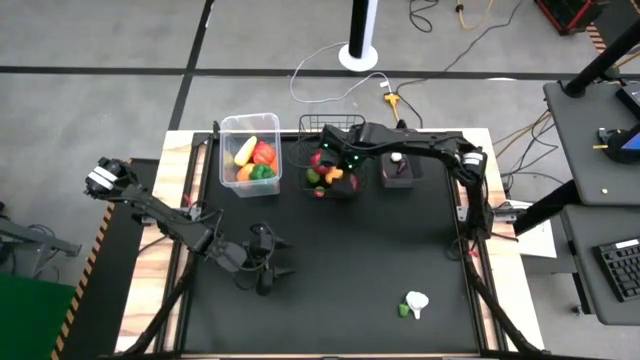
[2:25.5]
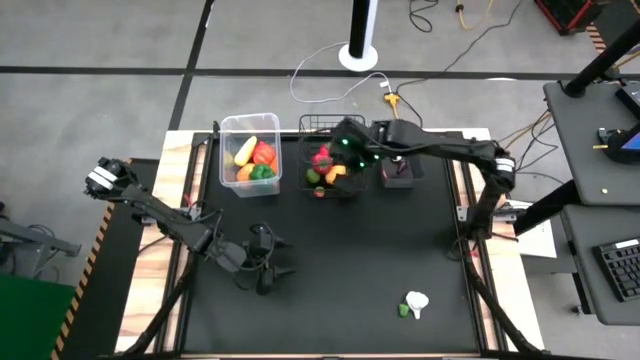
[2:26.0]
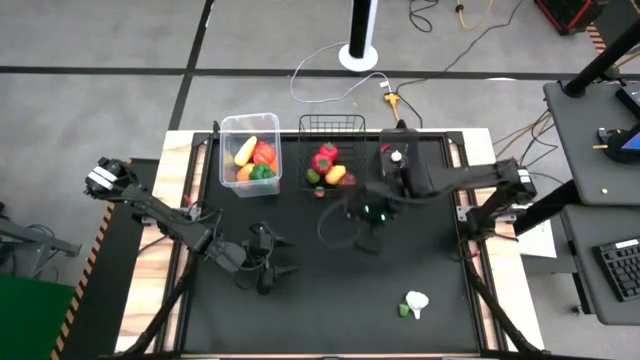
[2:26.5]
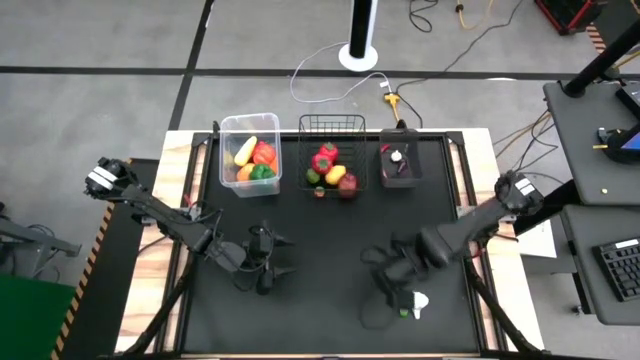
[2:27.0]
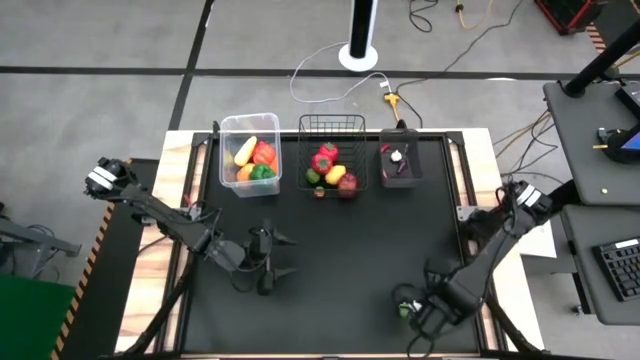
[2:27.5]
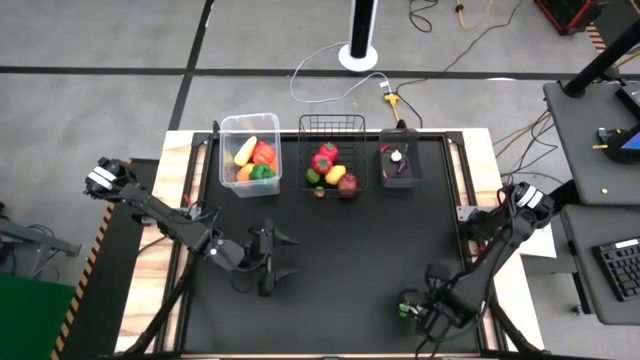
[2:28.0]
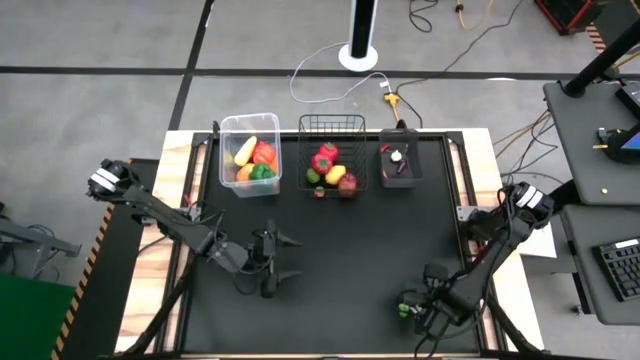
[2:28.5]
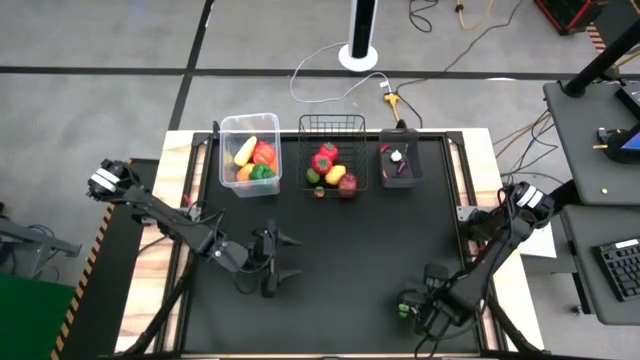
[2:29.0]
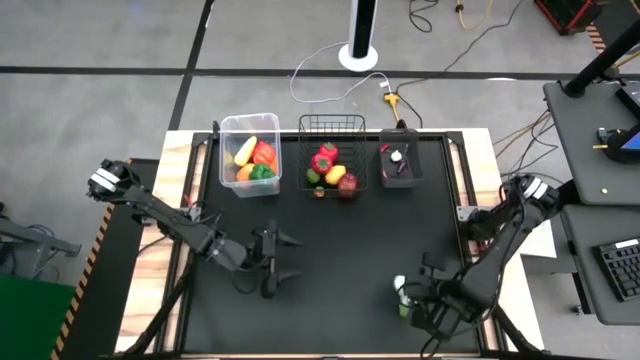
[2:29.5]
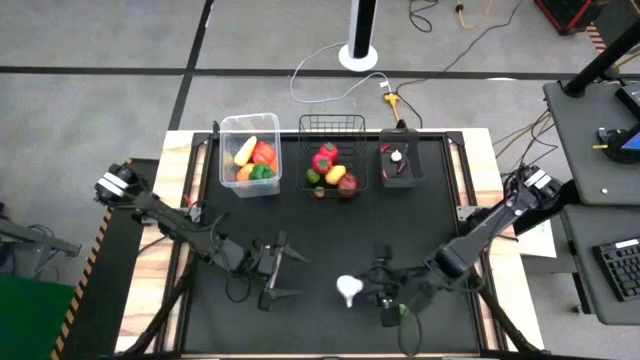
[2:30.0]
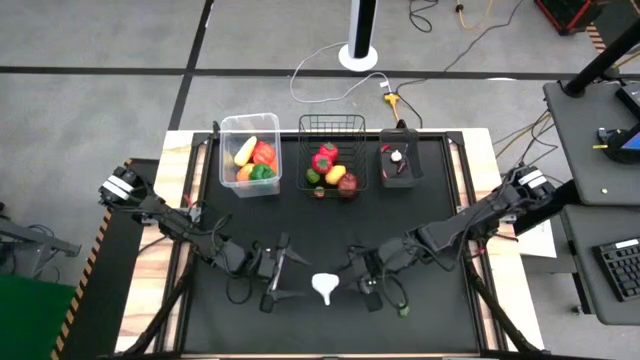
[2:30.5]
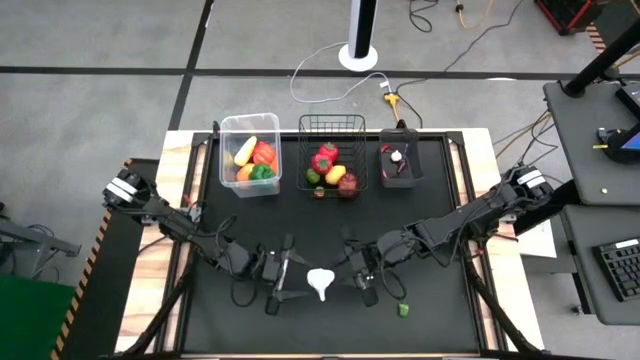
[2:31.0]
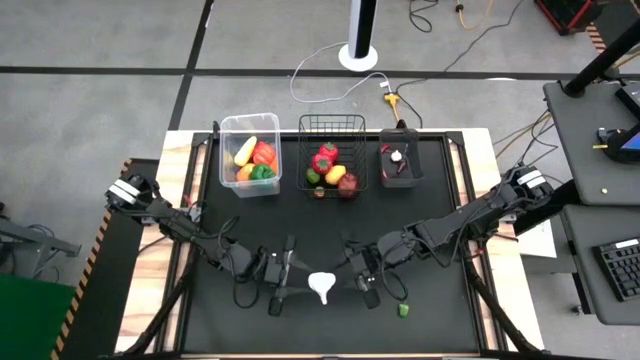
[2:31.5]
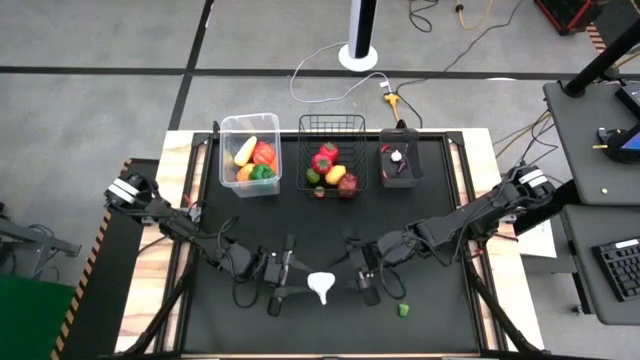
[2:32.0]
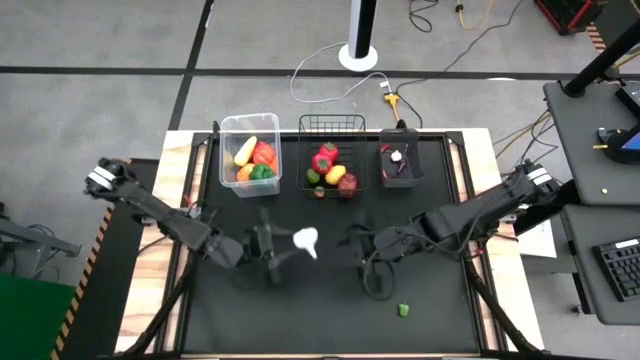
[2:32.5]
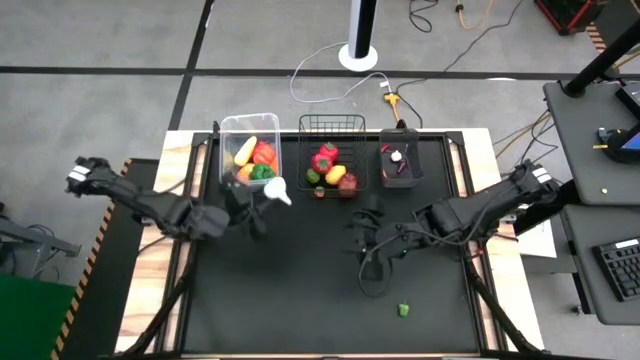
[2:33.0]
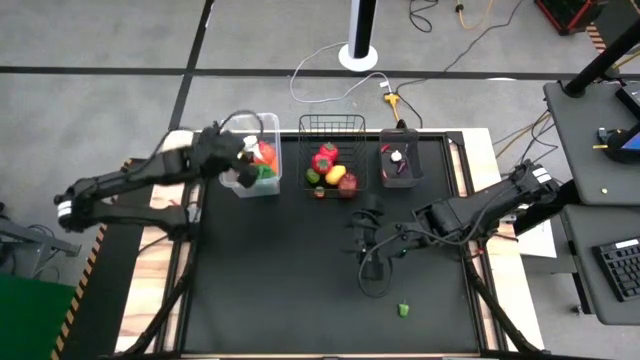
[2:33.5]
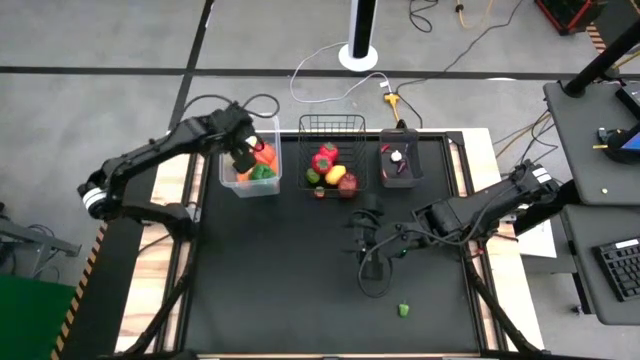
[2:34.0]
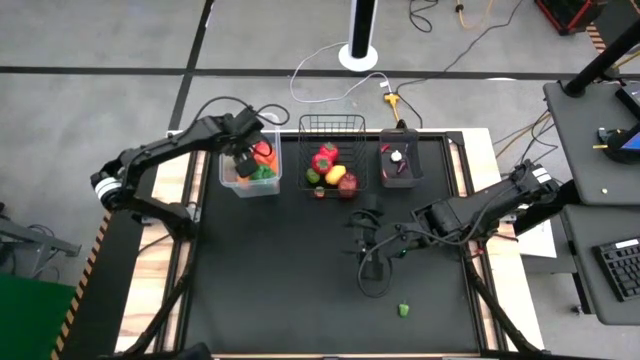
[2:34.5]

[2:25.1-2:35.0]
Task: Sort produce into baskets
Put the large white garlic into the transparent basket

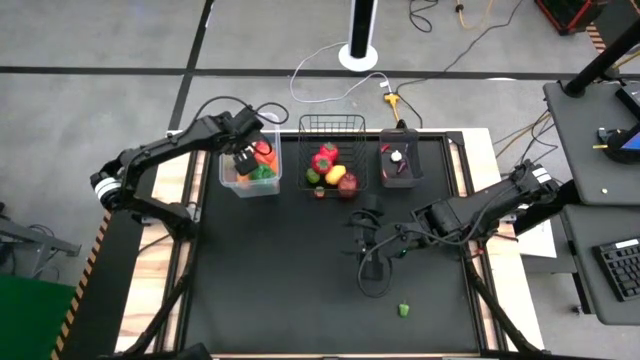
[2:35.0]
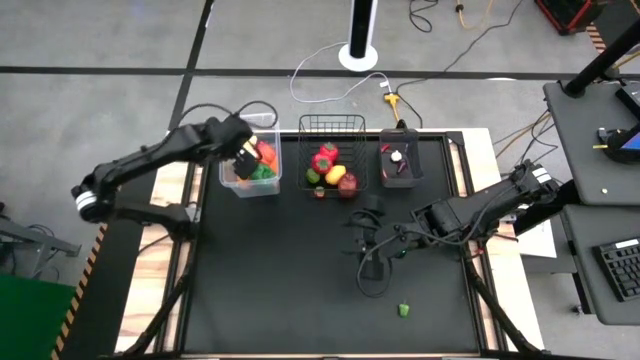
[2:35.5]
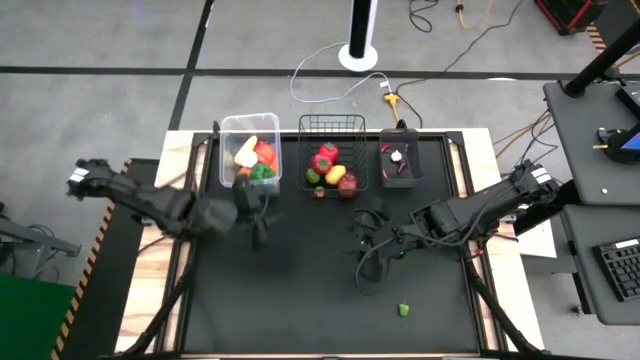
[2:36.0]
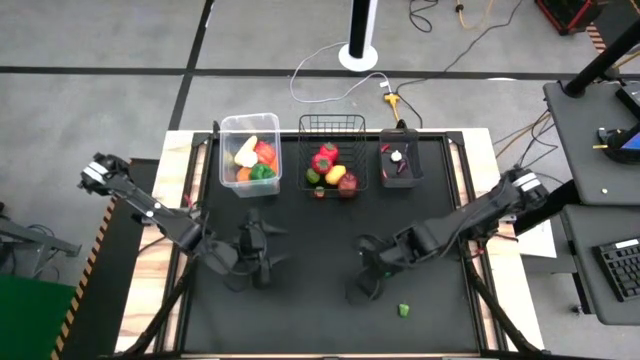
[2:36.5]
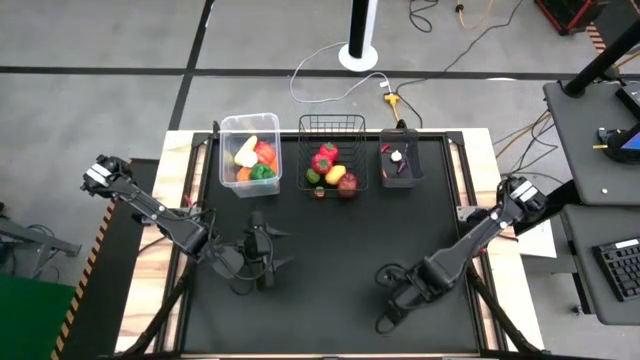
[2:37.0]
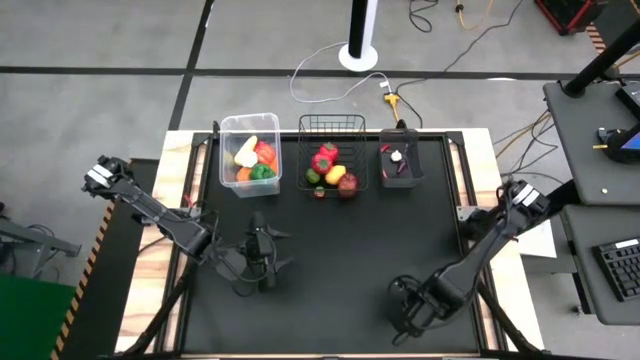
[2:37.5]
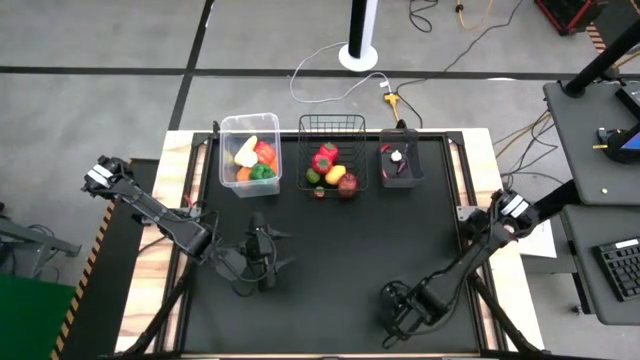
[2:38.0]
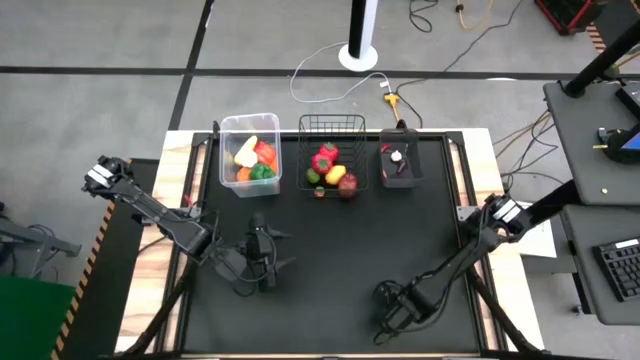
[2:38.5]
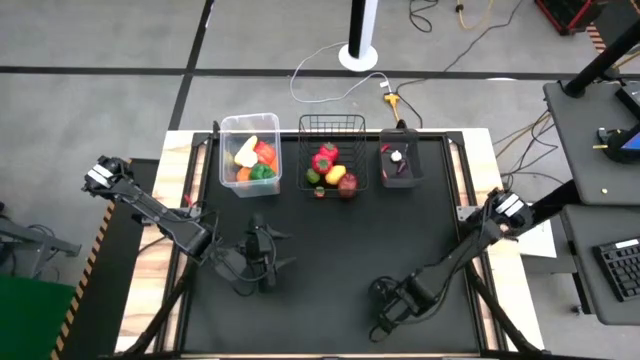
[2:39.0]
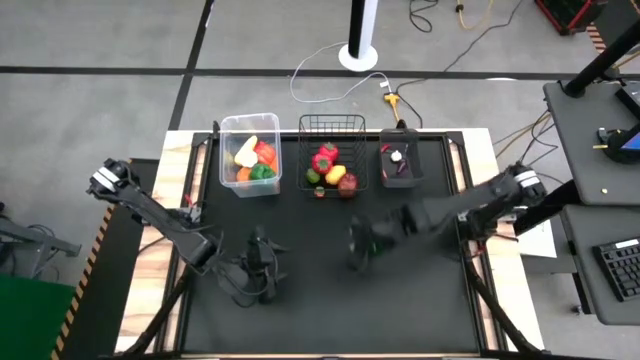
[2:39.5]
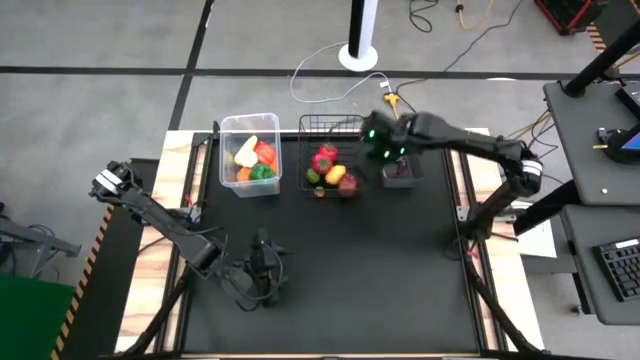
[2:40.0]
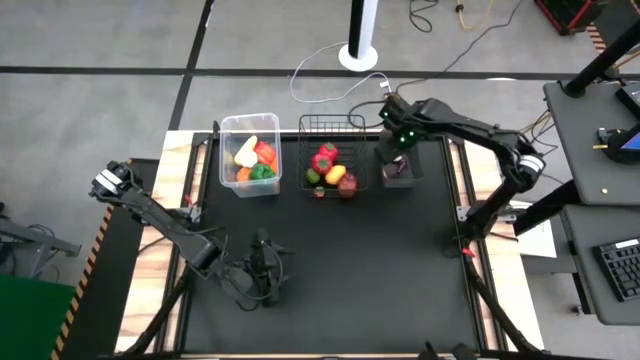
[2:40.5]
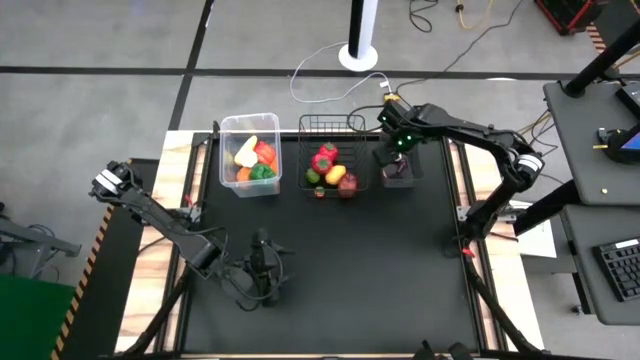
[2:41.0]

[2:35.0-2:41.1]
Put the small green bell pepper into the black basket

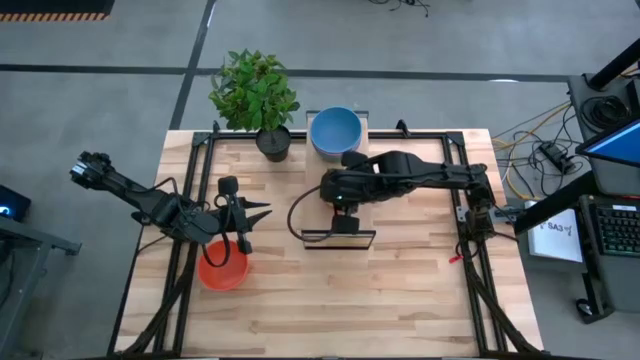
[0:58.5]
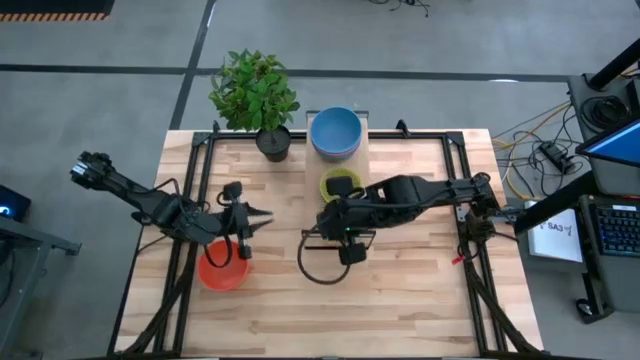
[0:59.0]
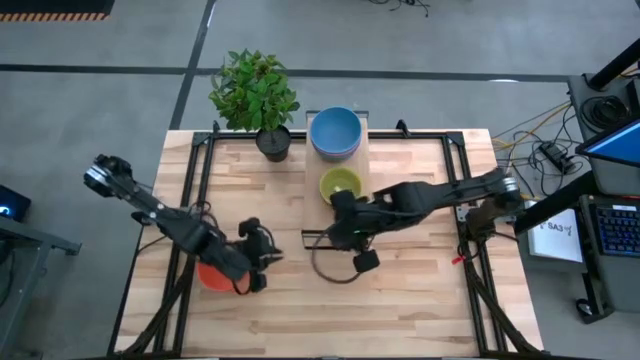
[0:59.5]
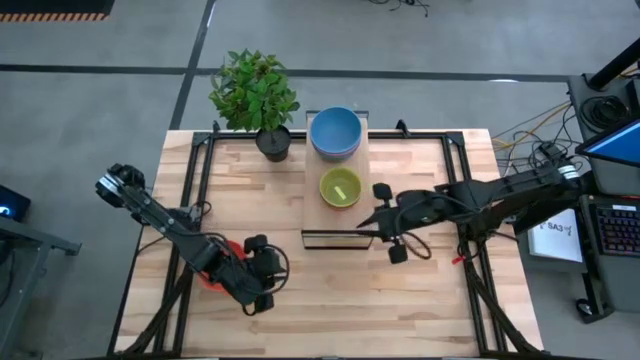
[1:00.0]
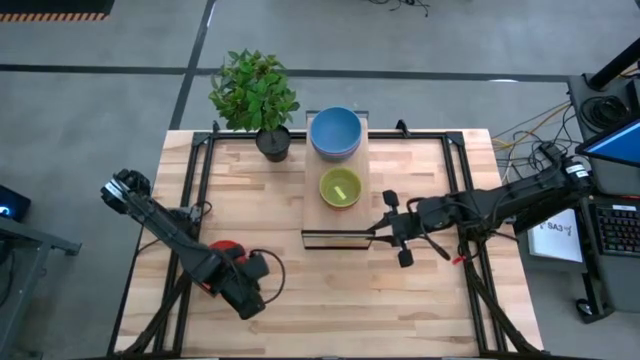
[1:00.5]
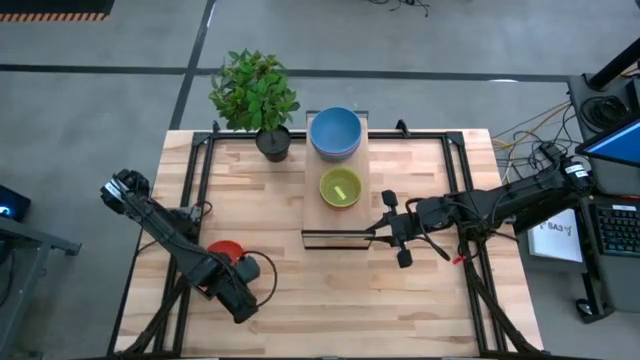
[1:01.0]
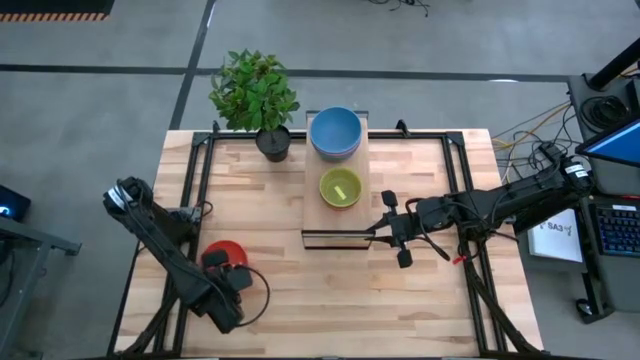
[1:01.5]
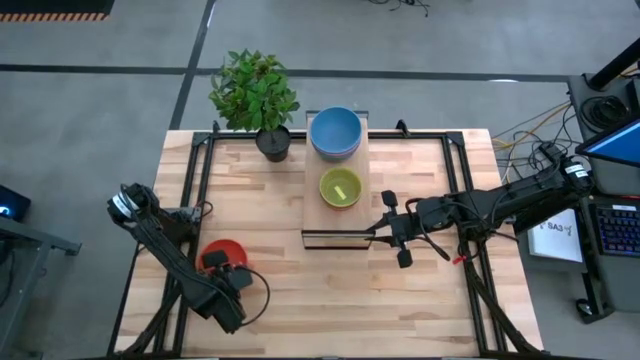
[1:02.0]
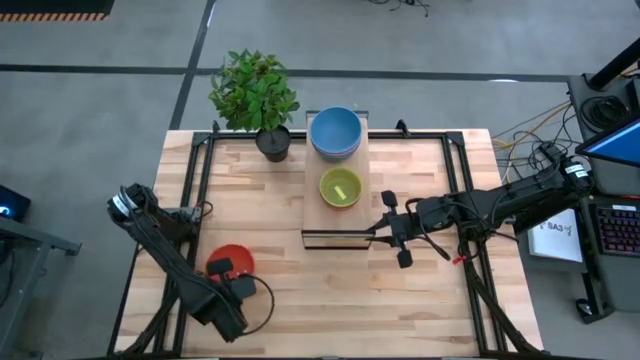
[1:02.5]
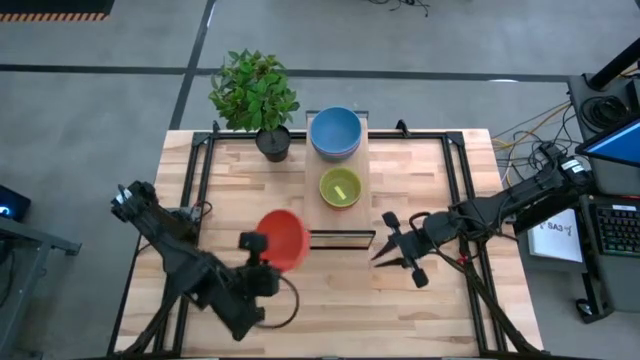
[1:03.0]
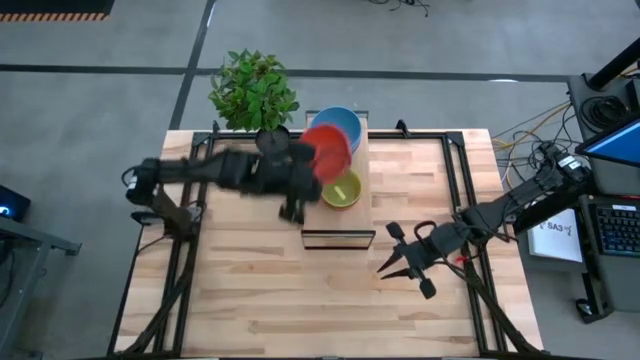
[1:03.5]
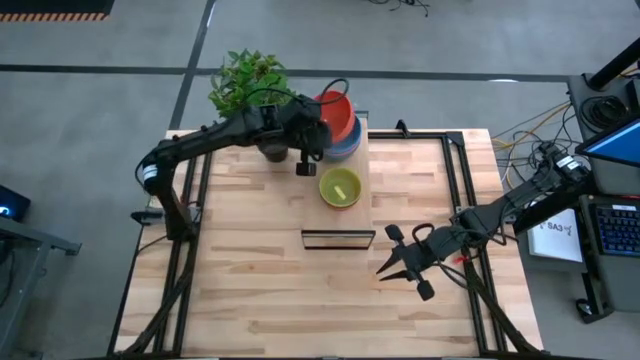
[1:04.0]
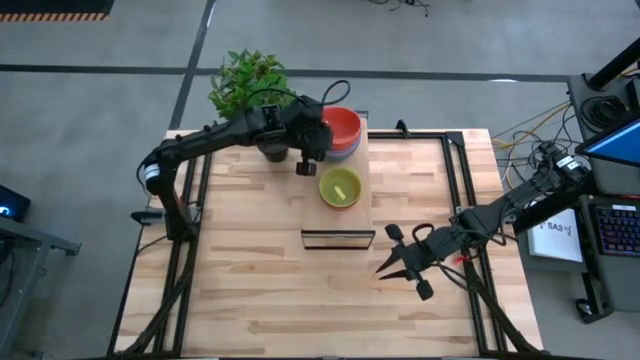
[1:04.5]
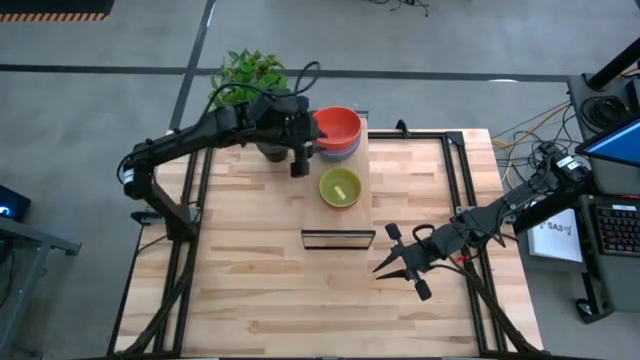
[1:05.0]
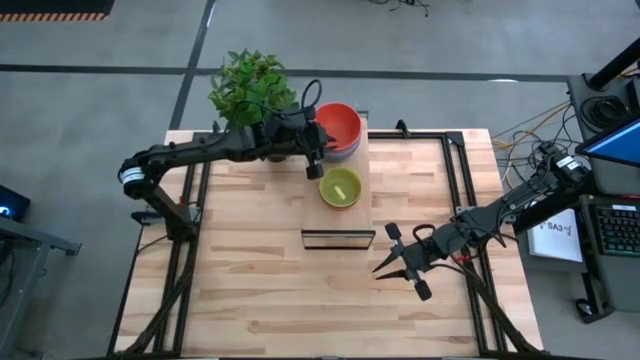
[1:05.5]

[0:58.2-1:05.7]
Task: Place and stack bowls onto a shelf
Stack the orange bowl into the blue bowl on the shelf
